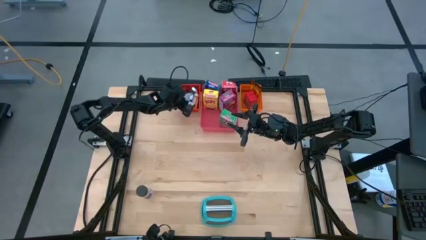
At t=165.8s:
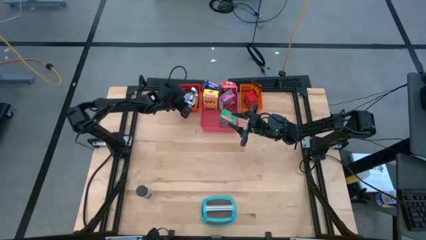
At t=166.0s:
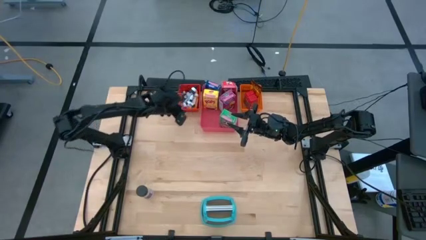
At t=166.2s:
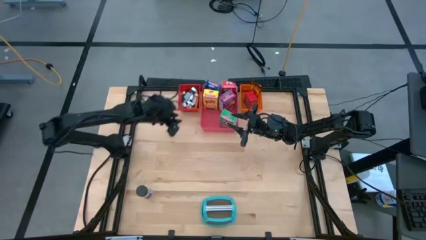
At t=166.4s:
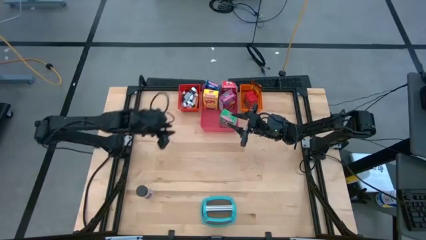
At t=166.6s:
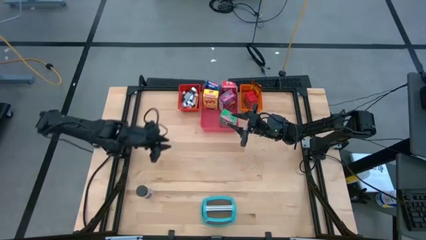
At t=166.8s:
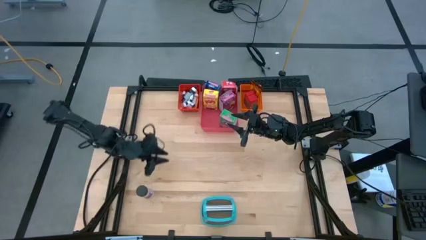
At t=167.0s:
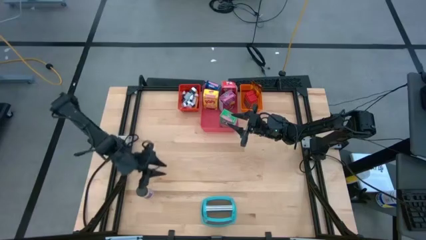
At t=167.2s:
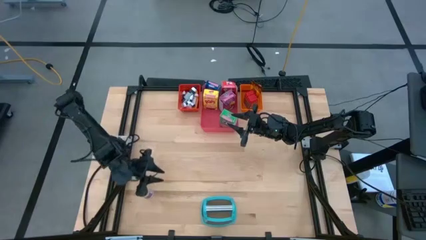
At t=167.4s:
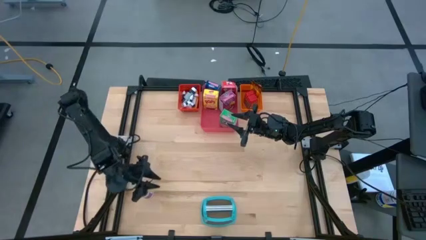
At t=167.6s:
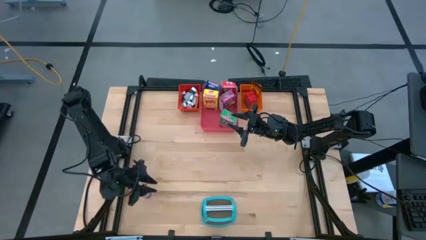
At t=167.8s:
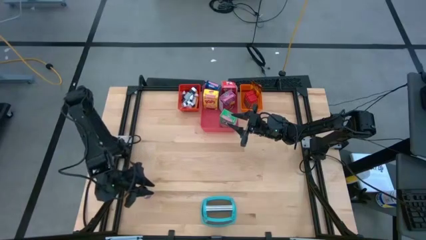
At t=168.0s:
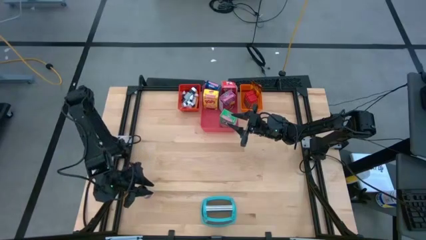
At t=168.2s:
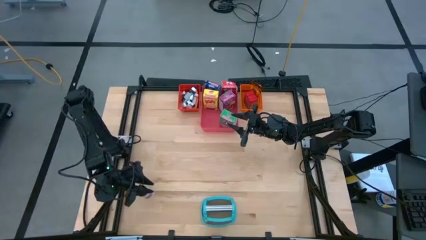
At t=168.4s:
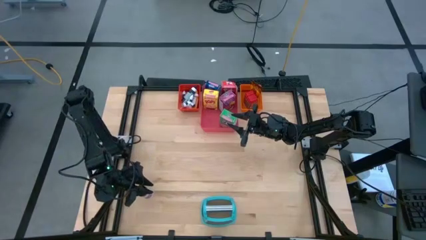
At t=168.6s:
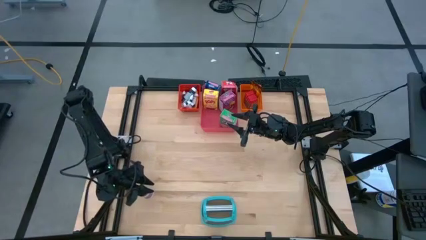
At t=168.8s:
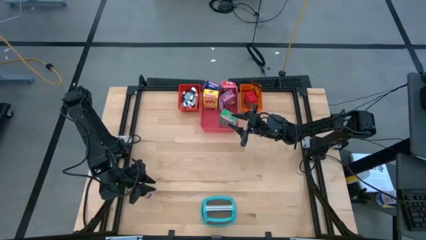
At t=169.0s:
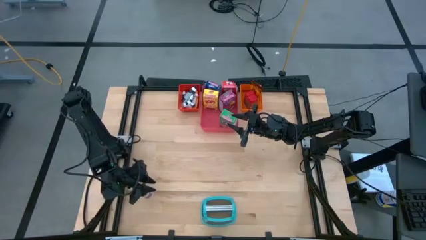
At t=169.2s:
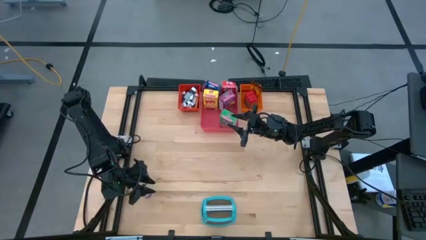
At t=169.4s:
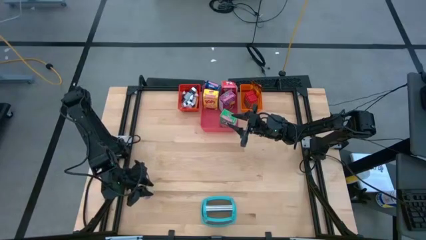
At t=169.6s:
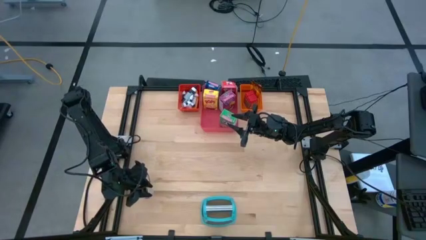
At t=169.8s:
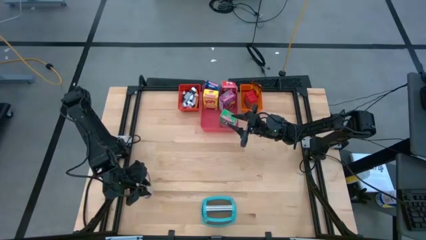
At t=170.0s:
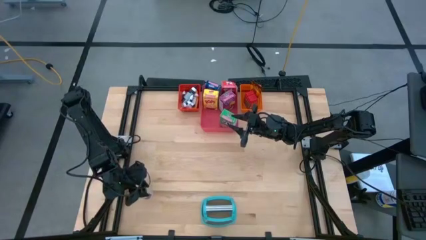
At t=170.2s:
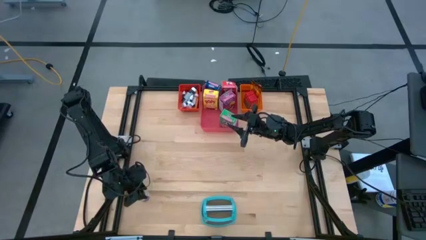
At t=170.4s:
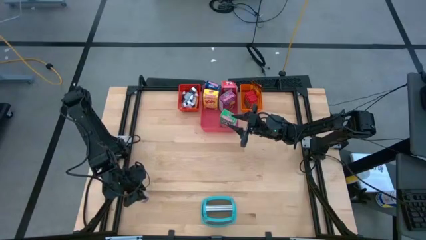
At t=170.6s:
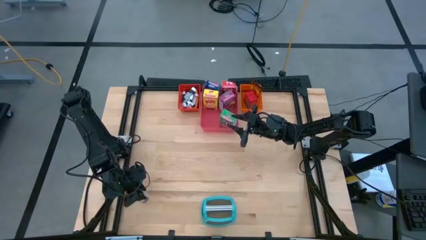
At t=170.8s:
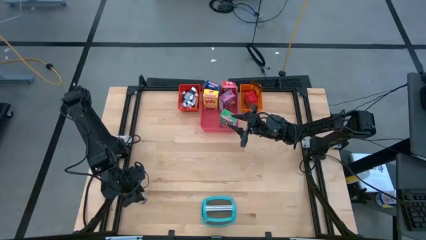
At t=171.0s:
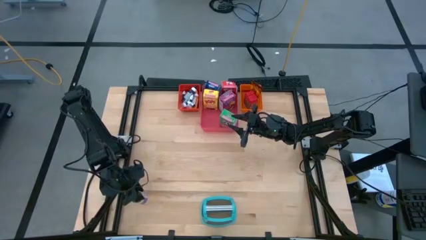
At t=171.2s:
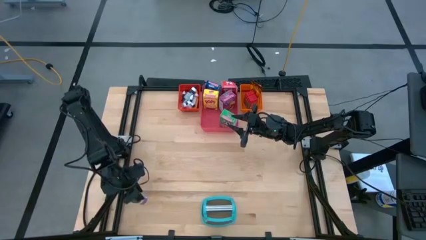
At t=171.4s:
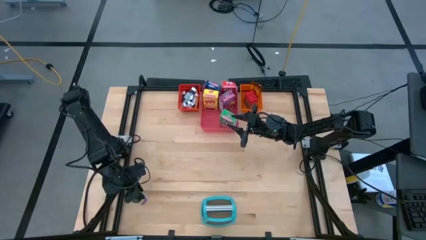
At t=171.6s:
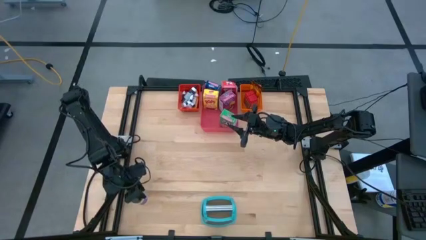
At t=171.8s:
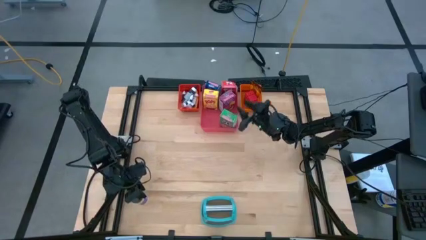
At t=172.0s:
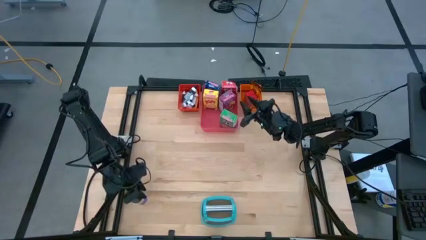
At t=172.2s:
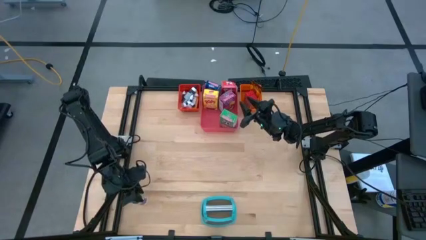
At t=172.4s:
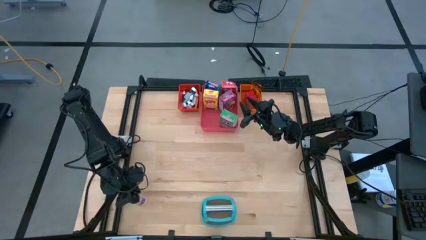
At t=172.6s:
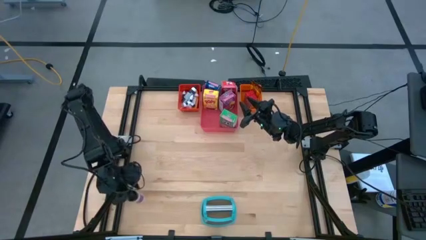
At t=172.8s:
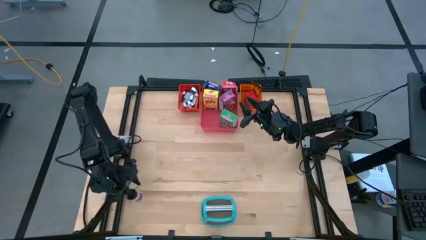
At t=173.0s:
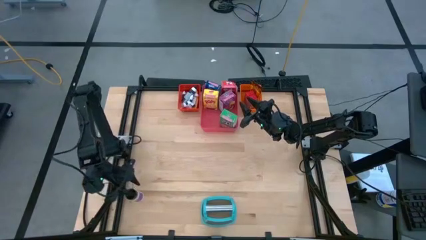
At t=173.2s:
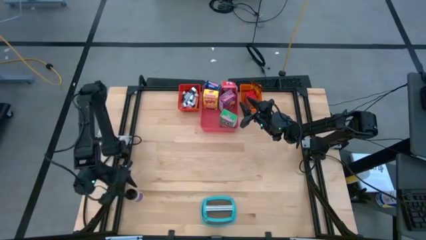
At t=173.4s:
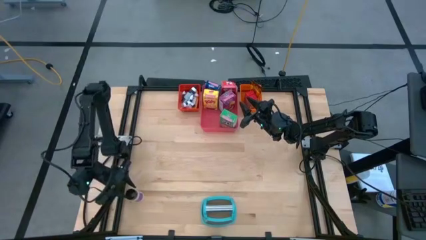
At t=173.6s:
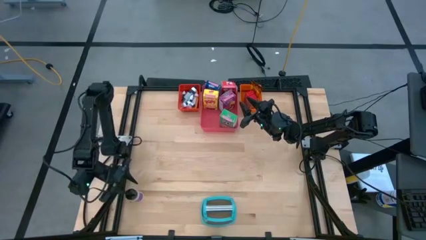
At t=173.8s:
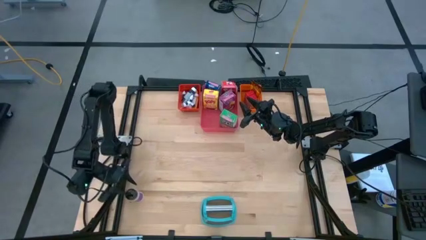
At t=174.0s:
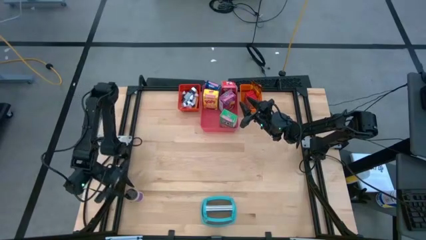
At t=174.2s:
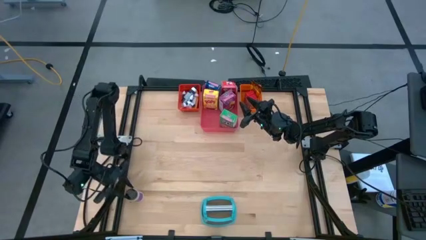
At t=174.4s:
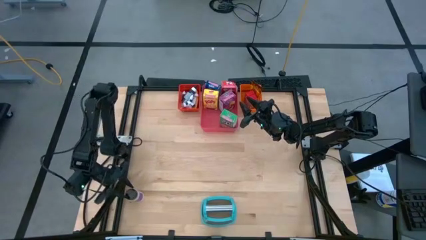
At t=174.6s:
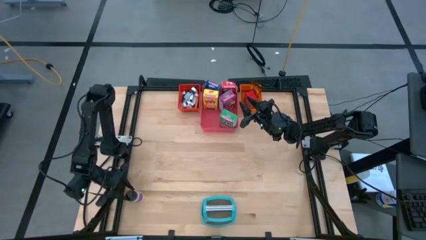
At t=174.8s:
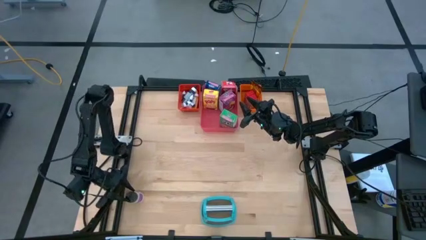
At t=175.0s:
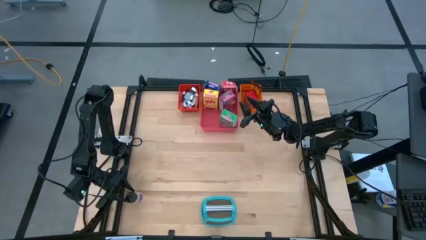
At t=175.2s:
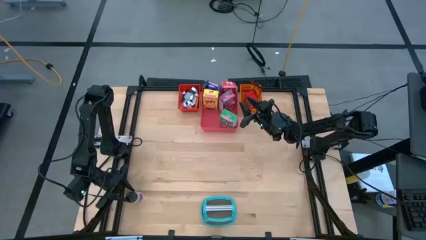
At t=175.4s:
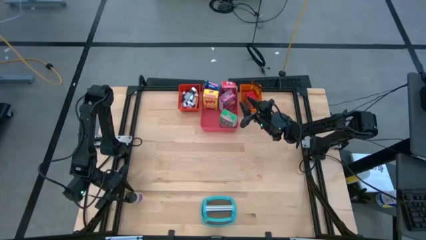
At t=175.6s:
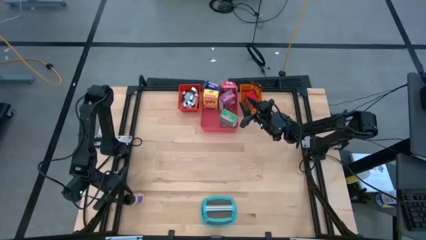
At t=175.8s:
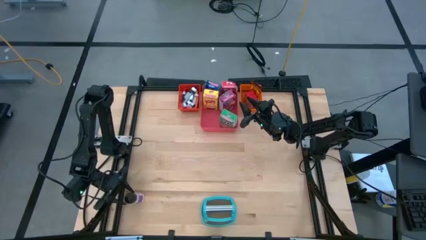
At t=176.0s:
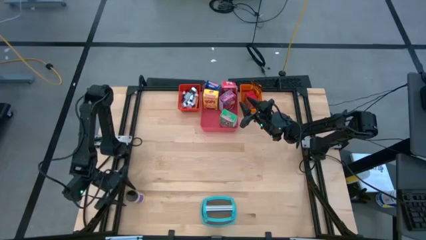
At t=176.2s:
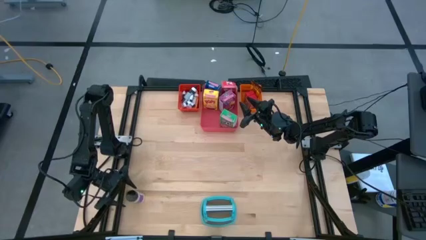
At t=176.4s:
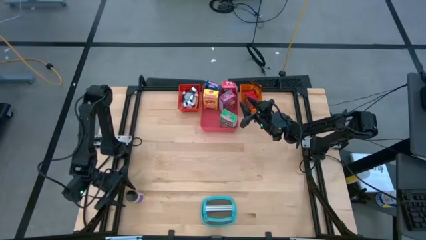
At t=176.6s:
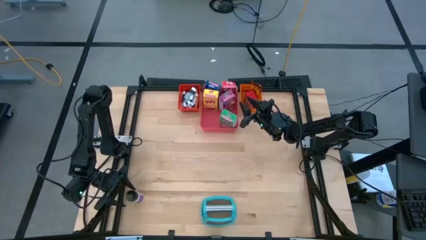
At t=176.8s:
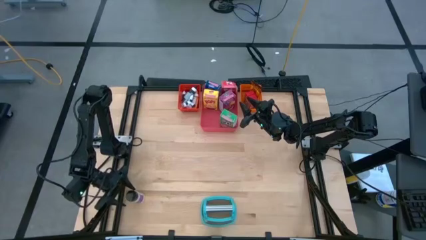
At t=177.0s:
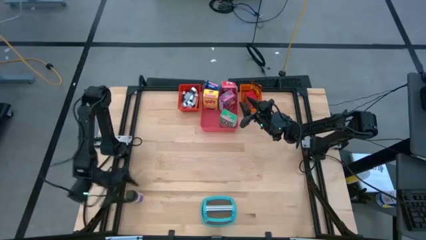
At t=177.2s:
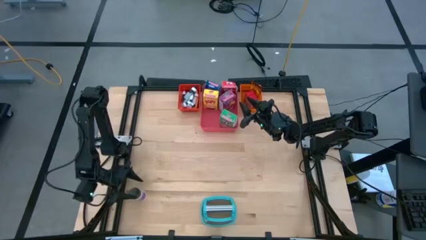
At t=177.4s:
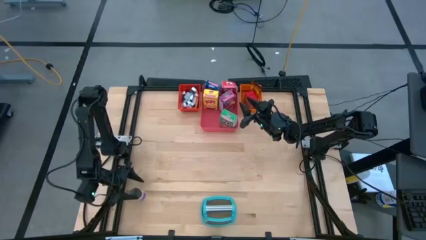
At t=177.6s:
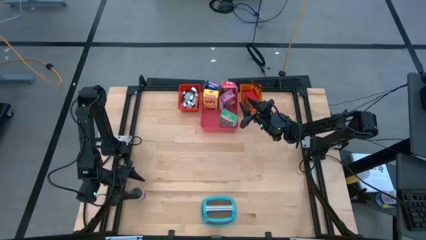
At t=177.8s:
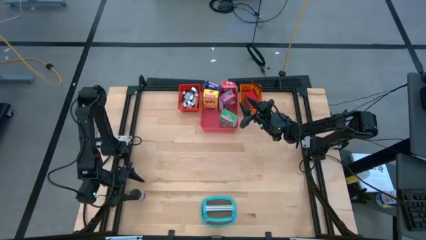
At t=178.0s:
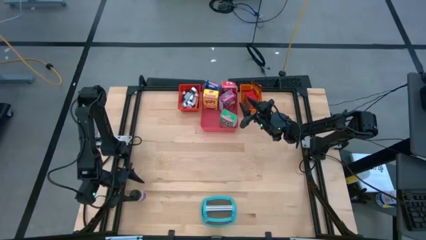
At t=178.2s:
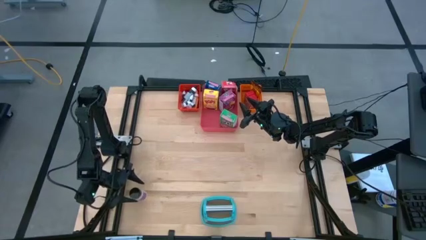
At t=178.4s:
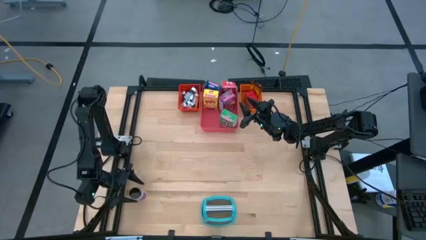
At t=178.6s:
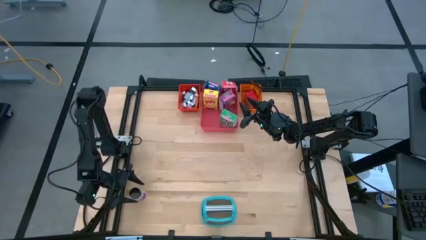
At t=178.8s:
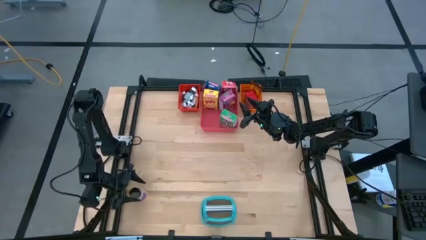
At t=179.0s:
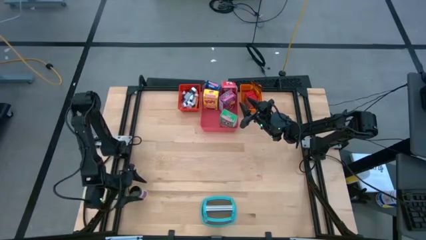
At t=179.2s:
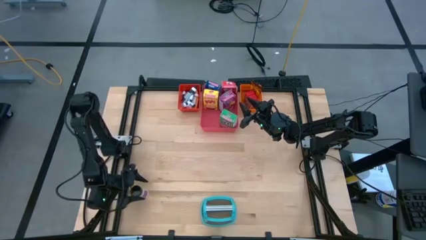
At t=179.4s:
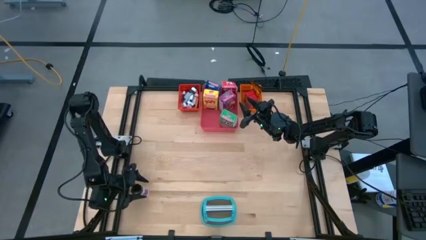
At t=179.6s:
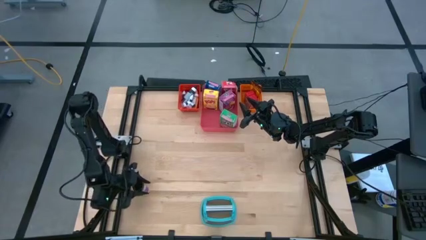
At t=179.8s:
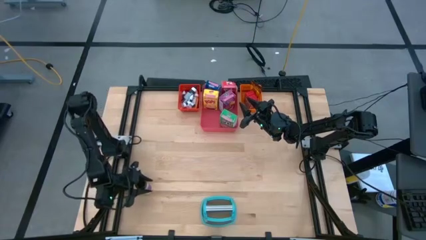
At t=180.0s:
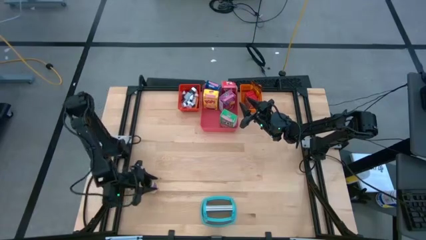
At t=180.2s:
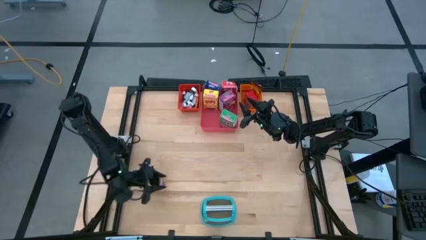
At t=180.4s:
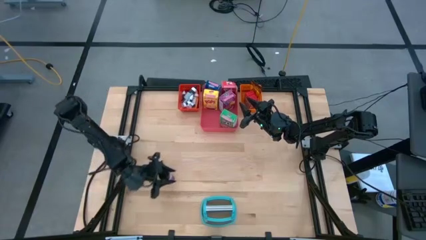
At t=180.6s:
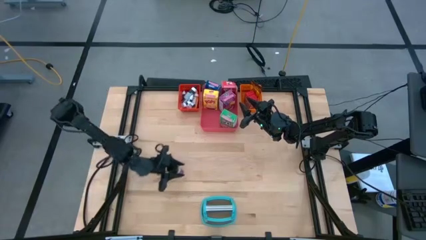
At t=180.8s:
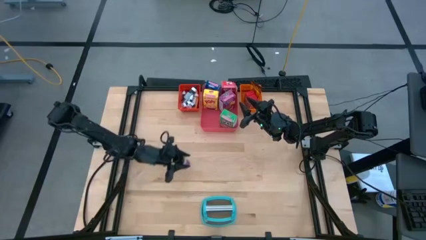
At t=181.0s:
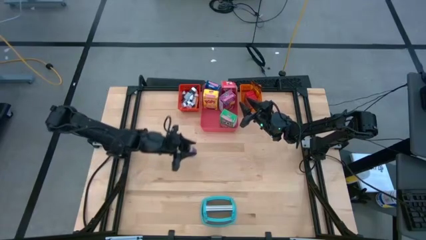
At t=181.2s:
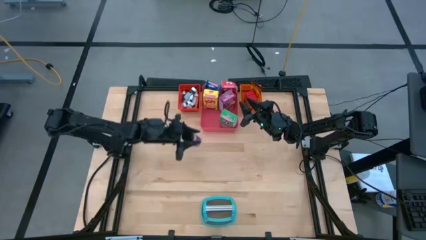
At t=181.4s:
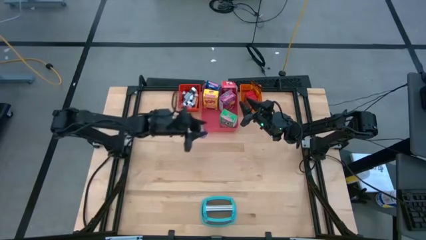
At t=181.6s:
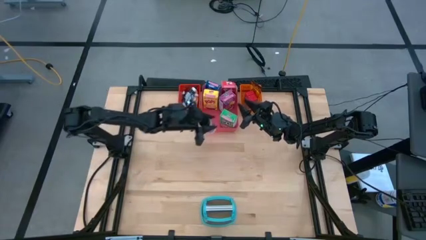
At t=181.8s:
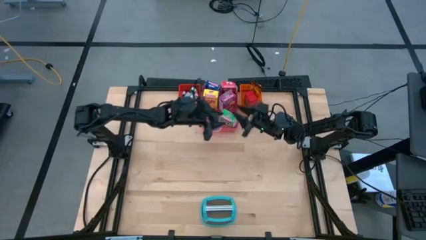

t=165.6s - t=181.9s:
Task: Pick & Place Kitchen Items
Put the purple seasoning bottle into the orange bin
